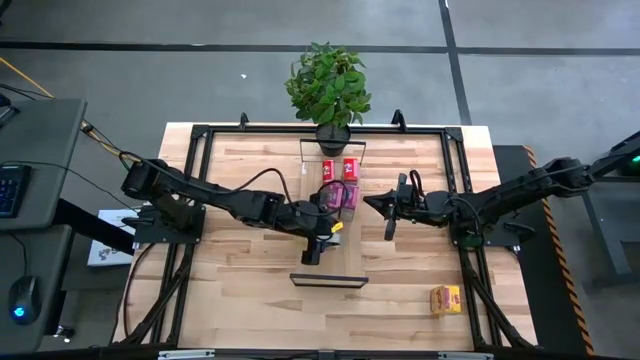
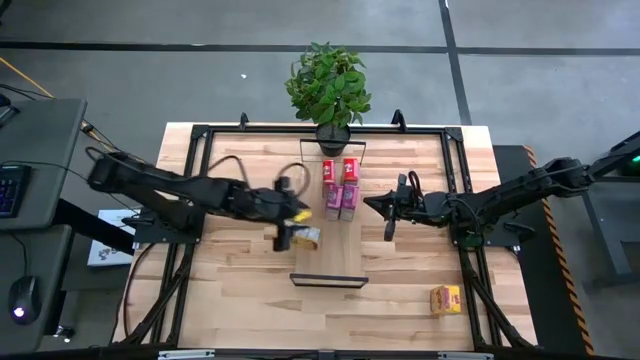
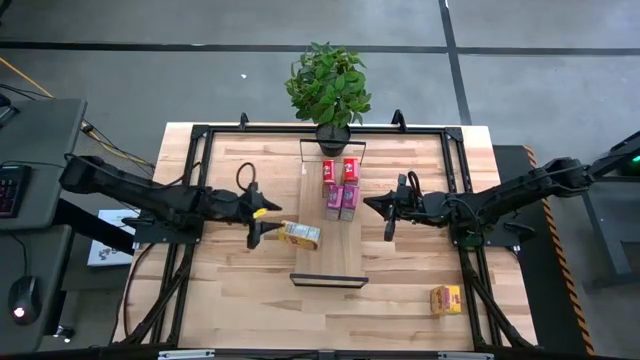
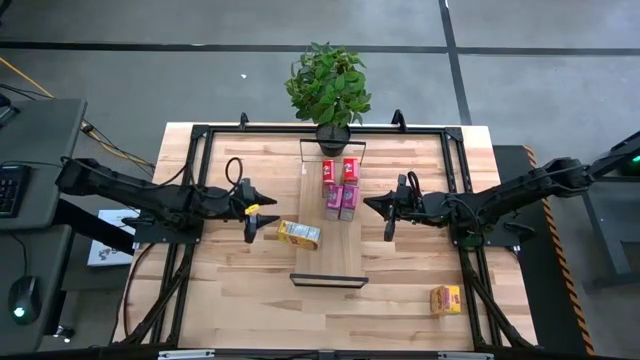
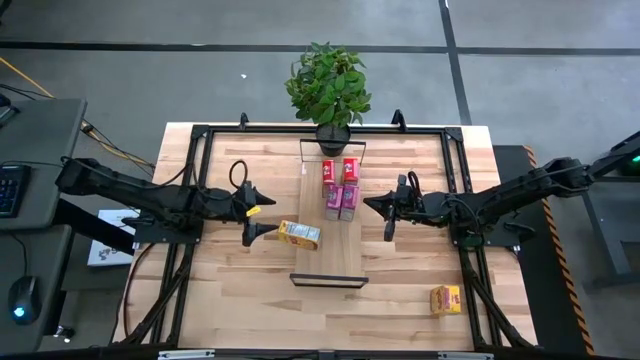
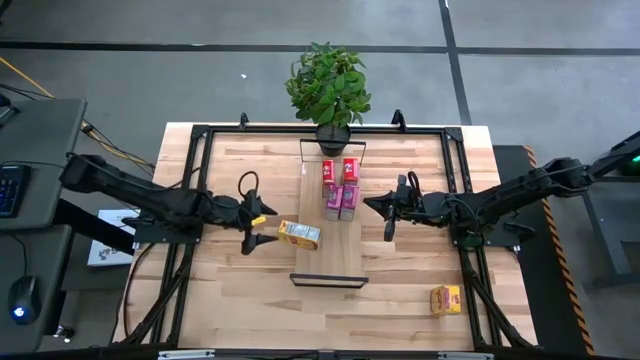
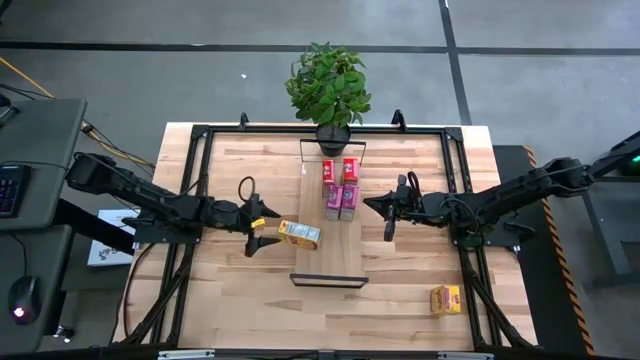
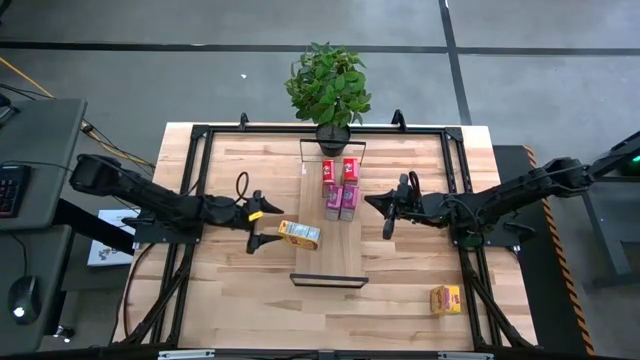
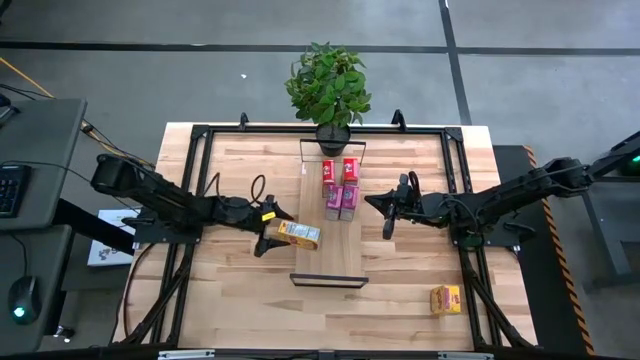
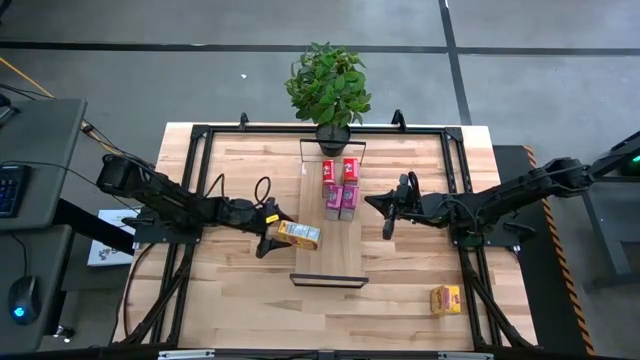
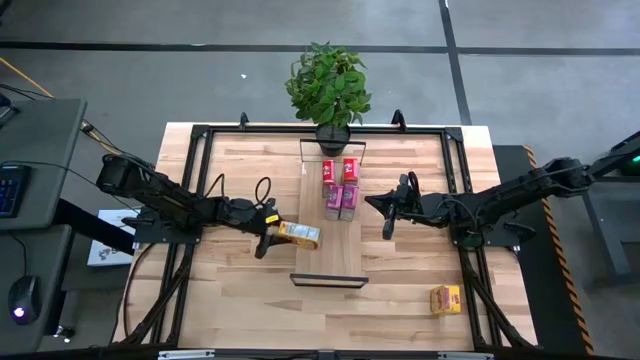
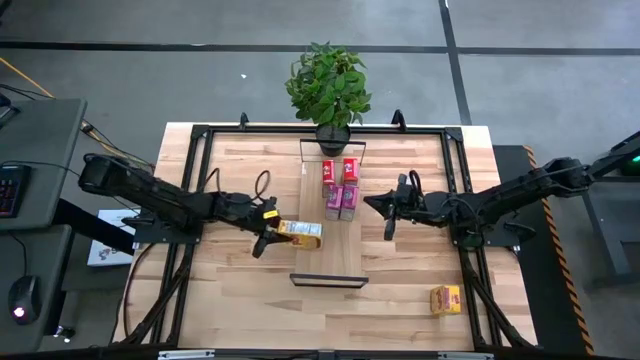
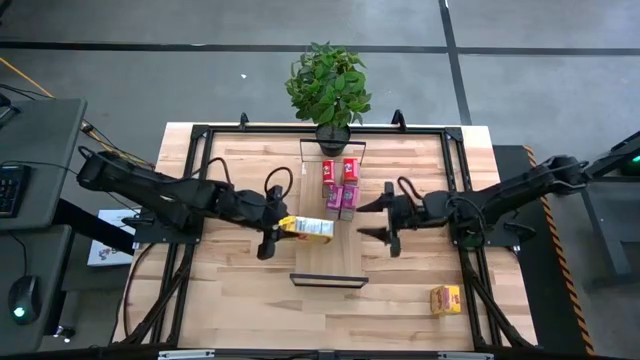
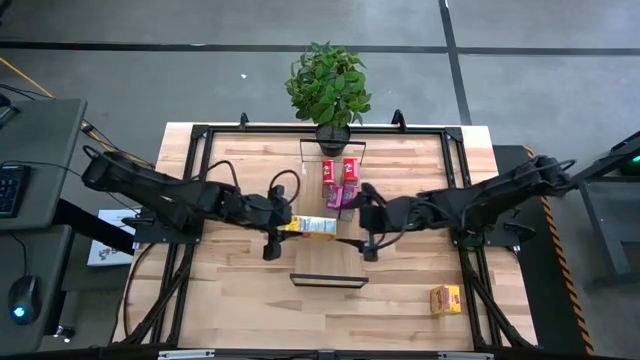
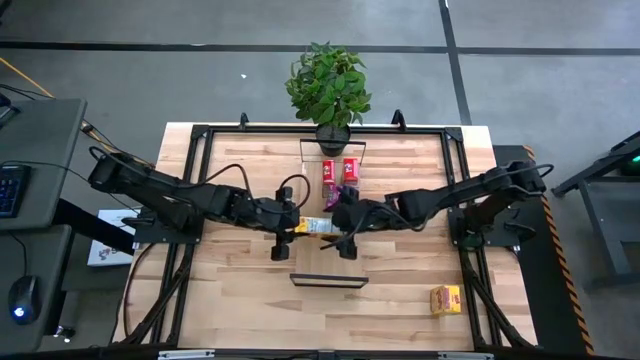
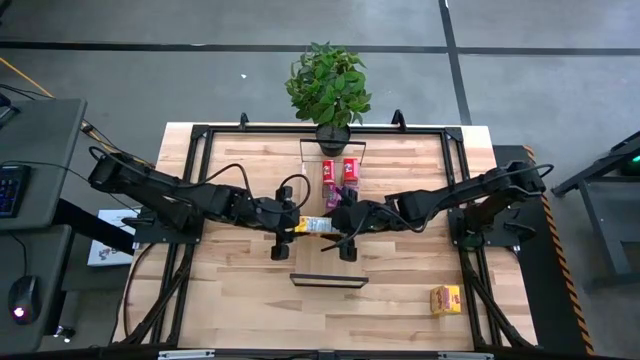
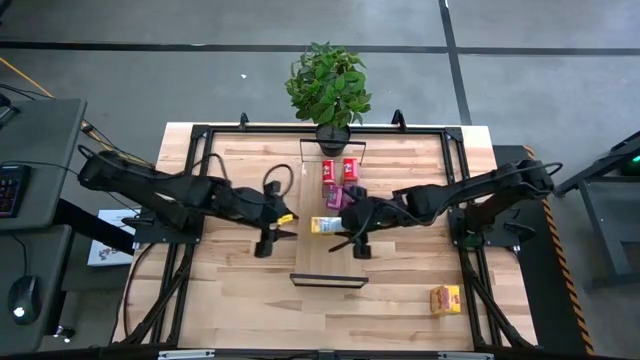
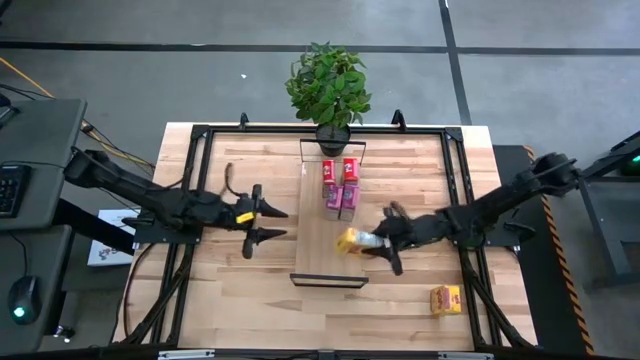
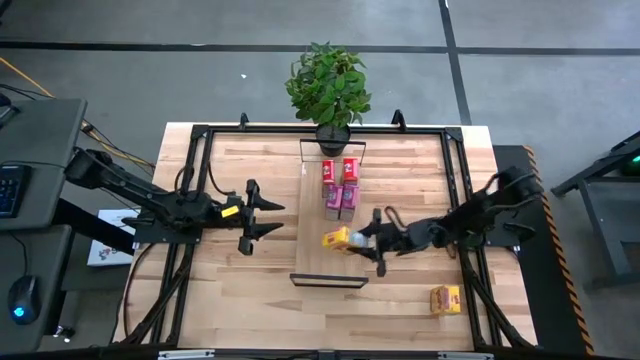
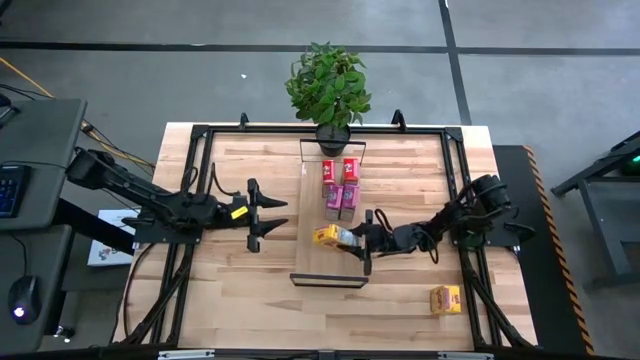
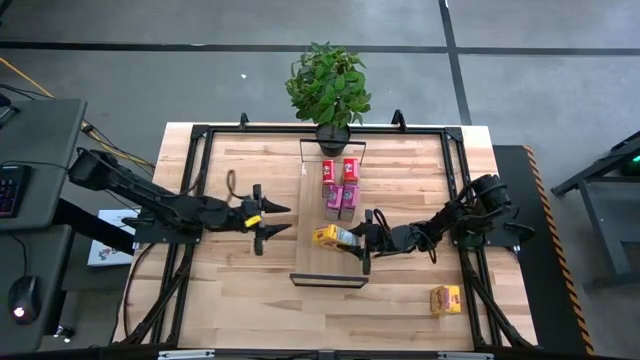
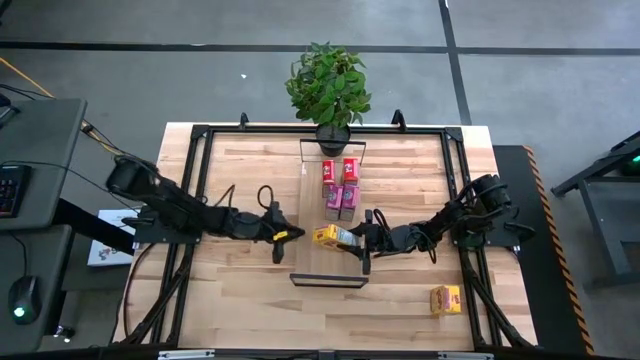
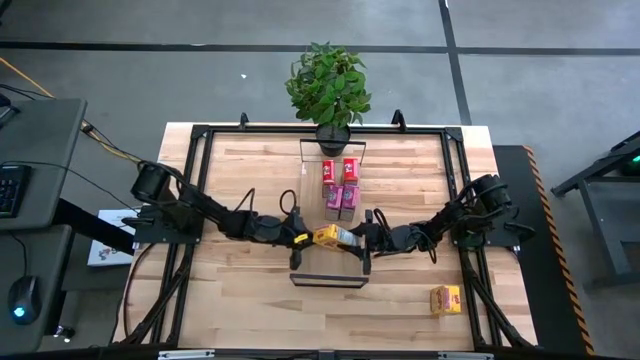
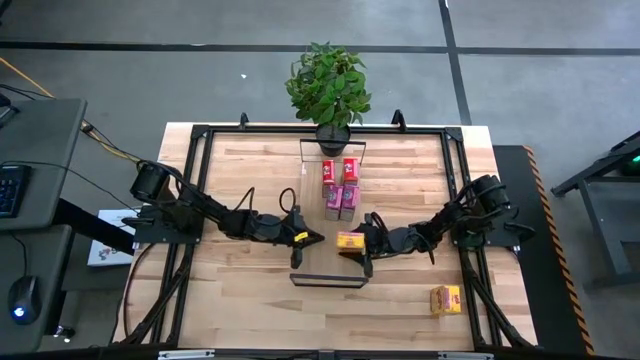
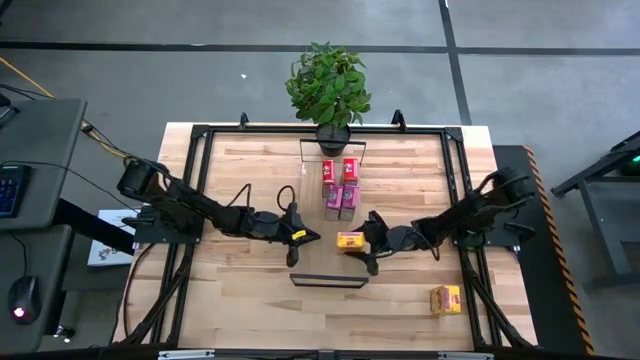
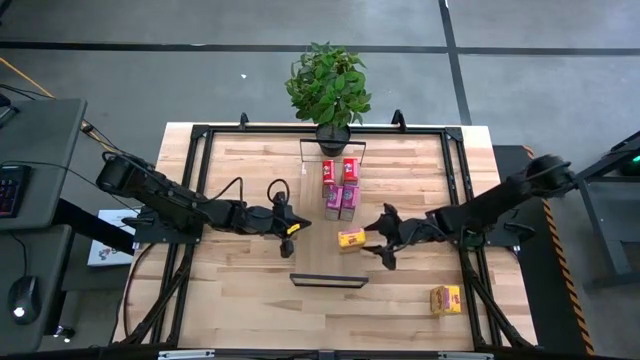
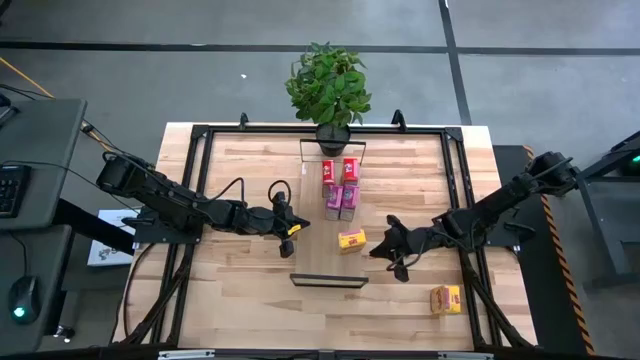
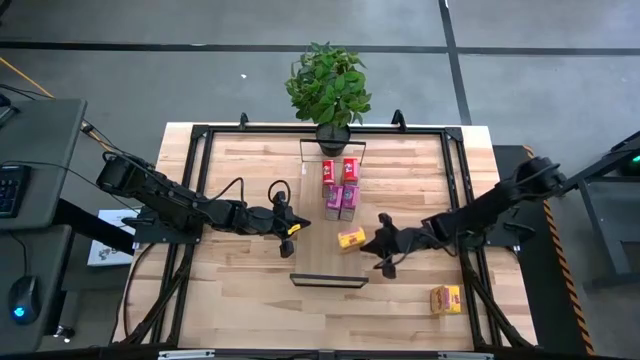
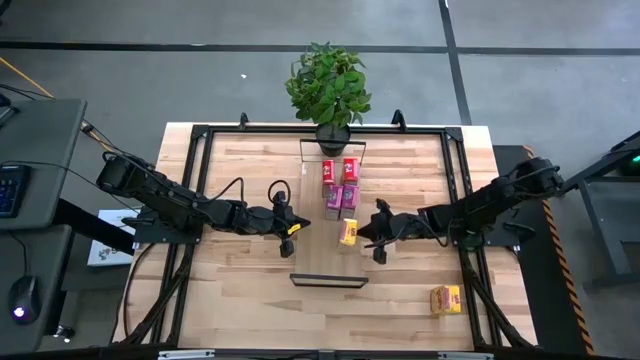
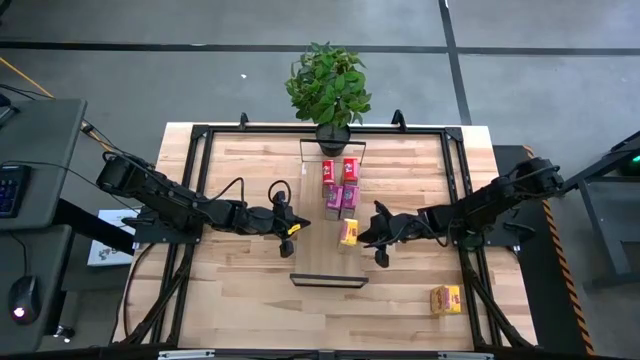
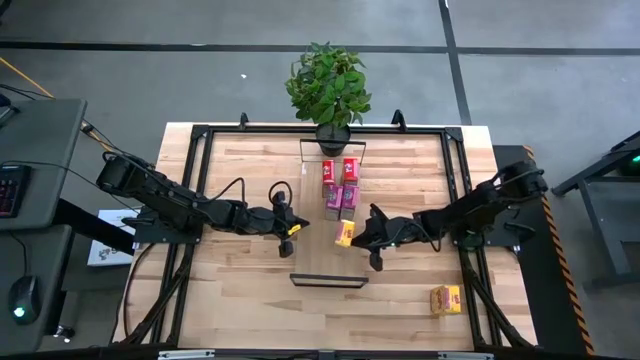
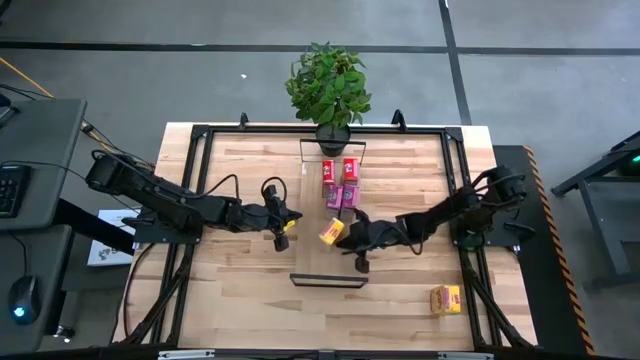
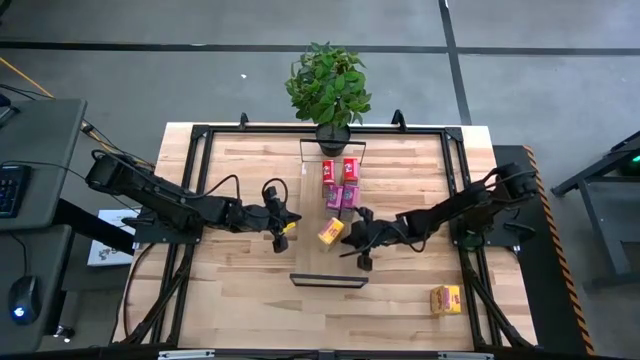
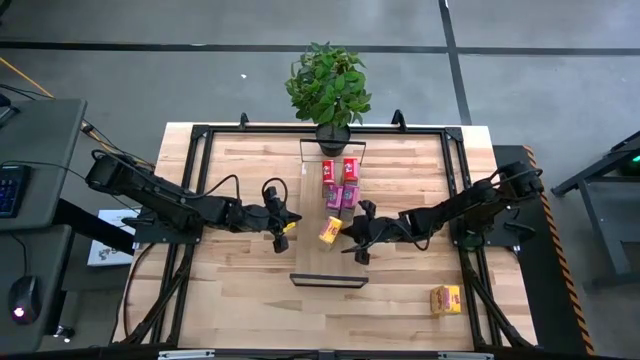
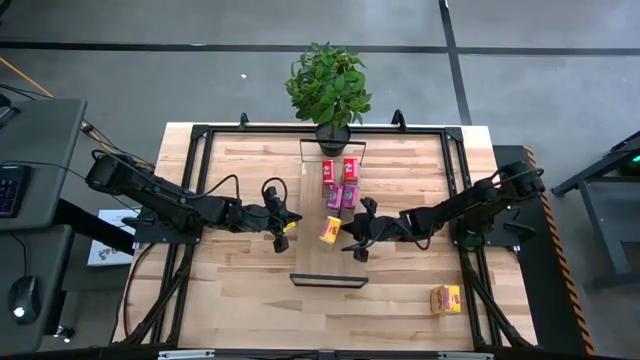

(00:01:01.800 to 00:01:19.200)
Task: Stack cereal on shelf
Put the left yellow cereal box on the shelf

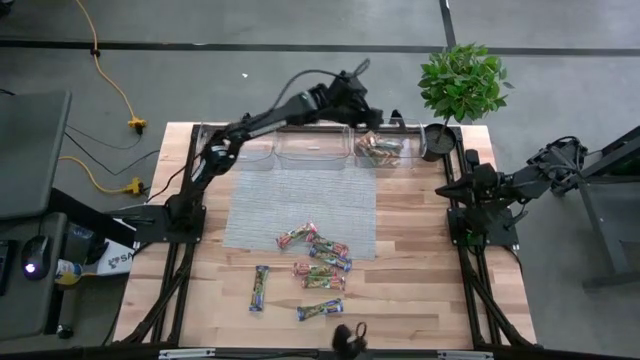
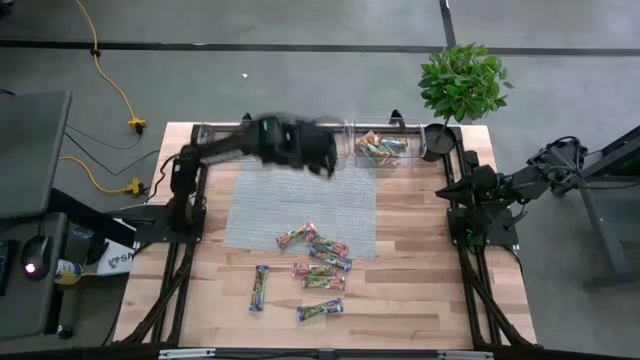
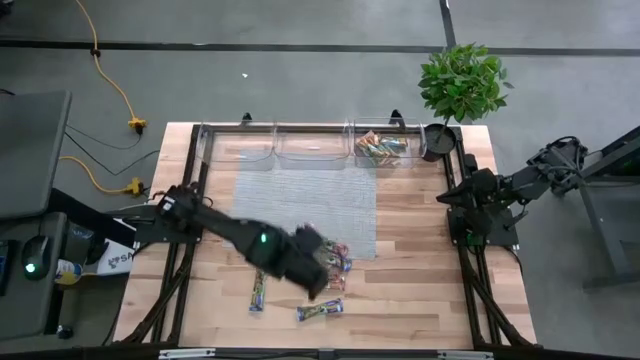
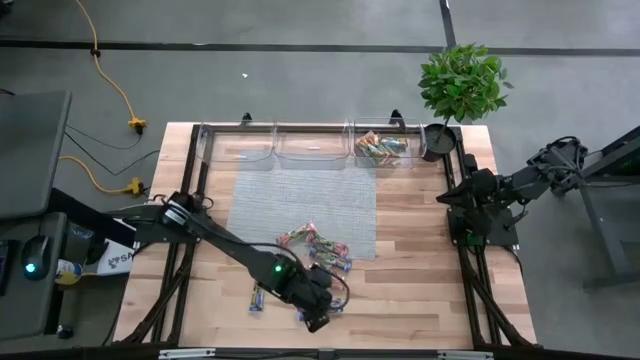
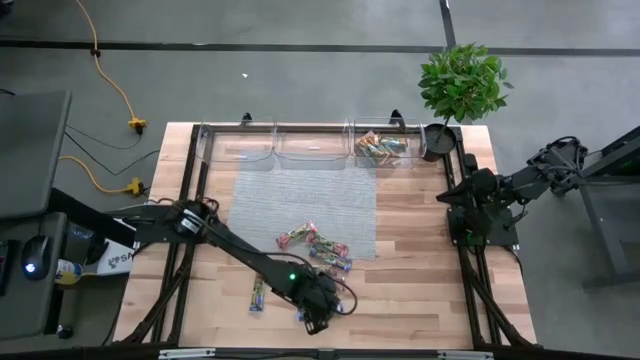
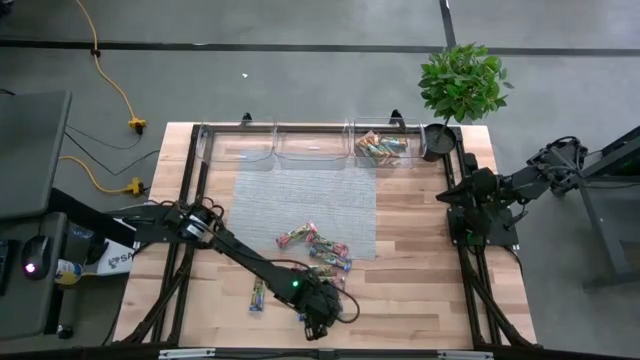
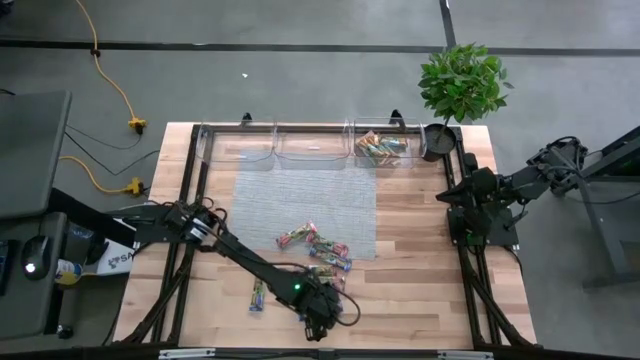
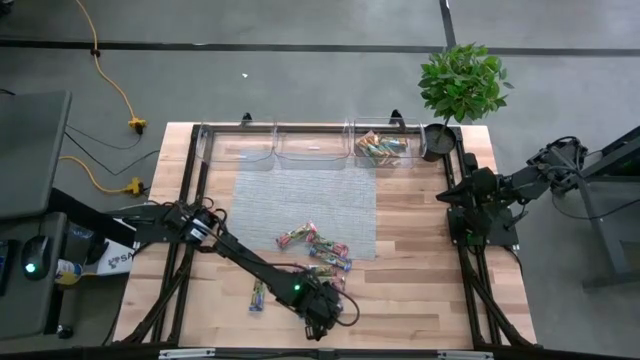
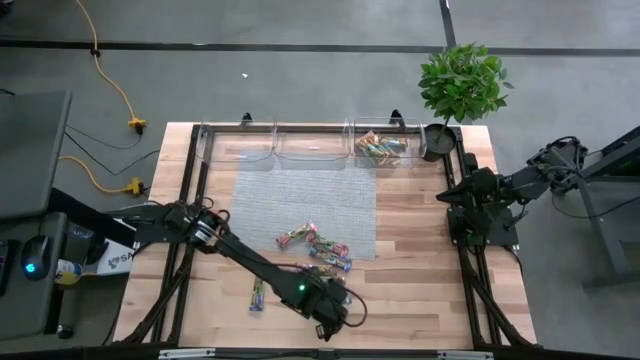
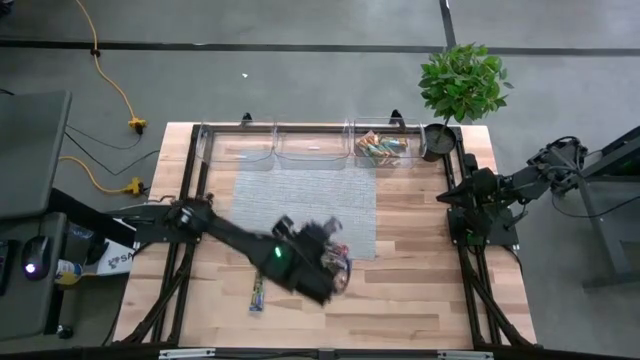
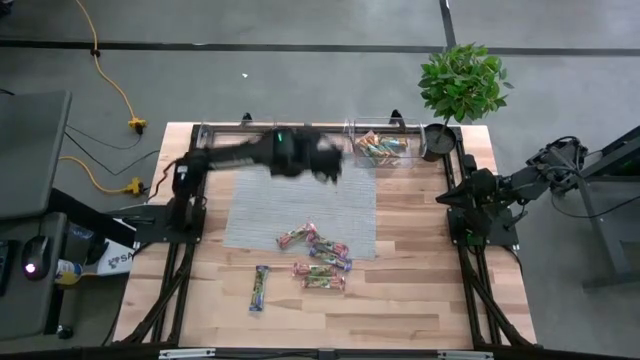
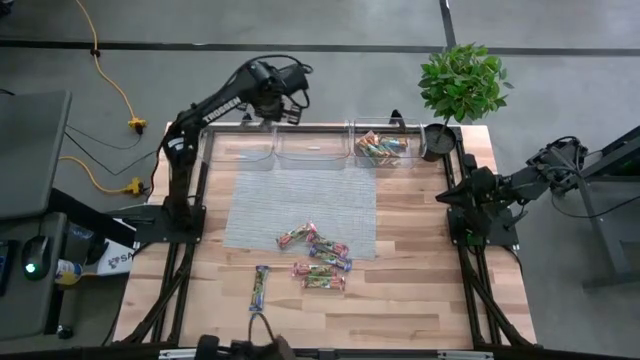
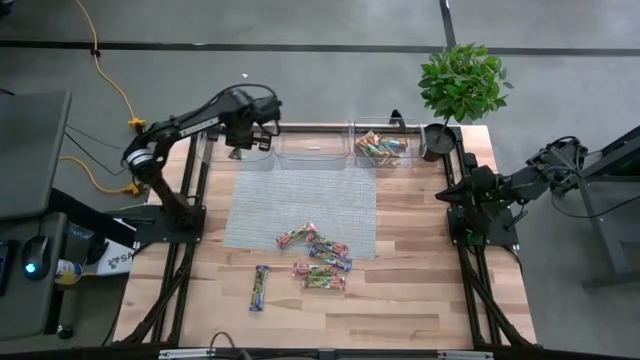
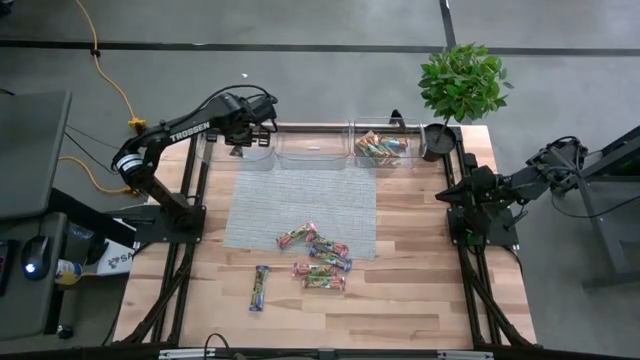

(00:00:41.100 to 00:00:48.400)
Task: Pick and place Granola Bars by type
Put the blue granola bar into the left transparent bin
